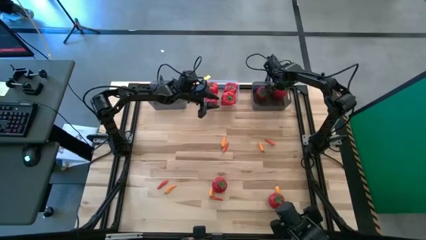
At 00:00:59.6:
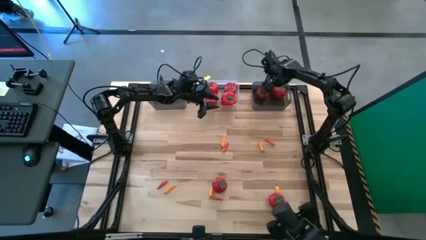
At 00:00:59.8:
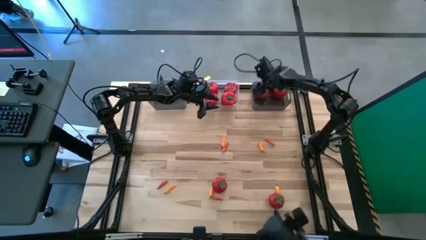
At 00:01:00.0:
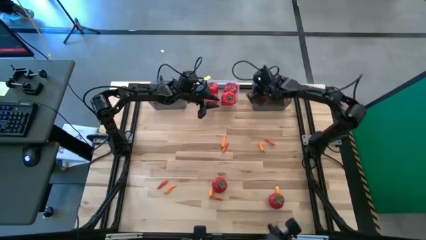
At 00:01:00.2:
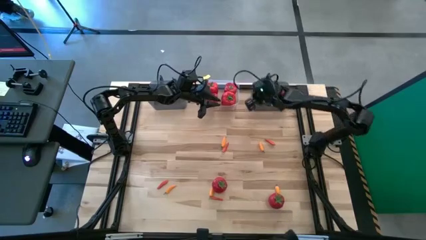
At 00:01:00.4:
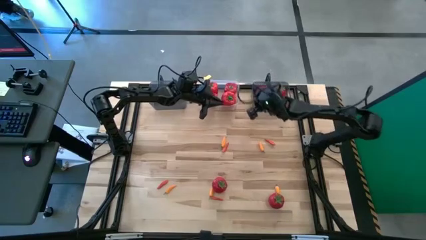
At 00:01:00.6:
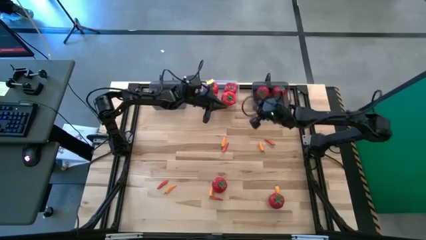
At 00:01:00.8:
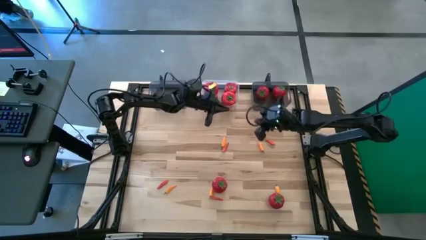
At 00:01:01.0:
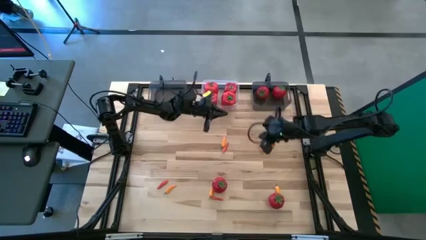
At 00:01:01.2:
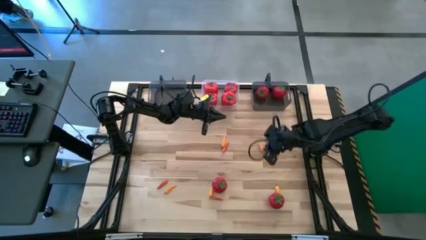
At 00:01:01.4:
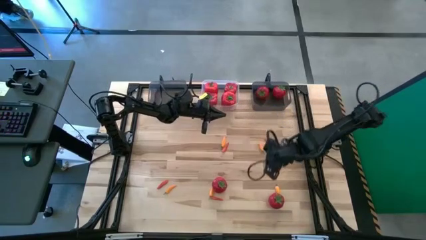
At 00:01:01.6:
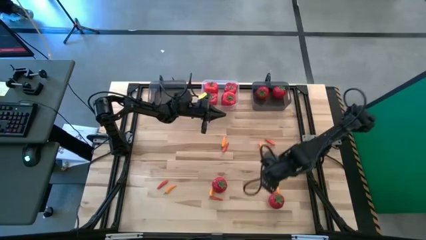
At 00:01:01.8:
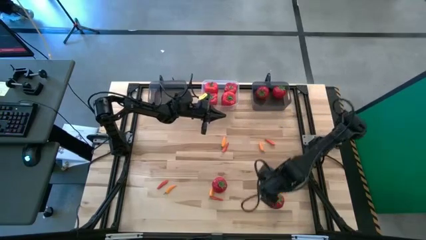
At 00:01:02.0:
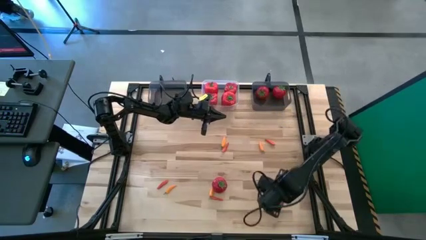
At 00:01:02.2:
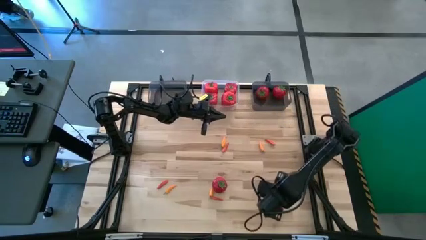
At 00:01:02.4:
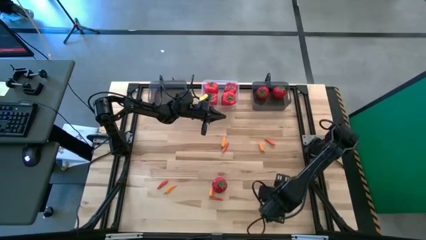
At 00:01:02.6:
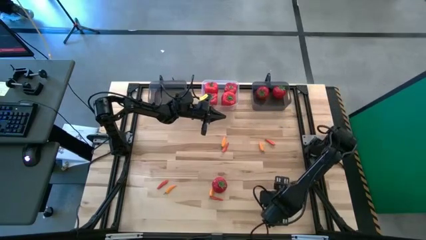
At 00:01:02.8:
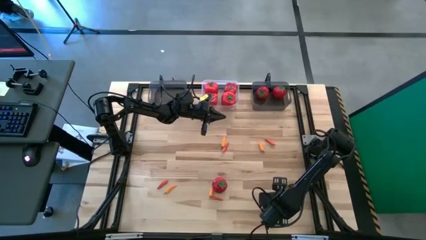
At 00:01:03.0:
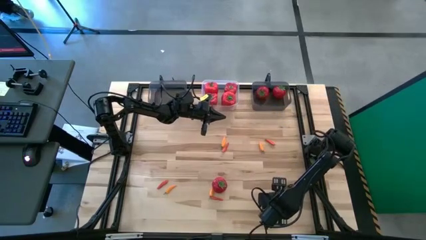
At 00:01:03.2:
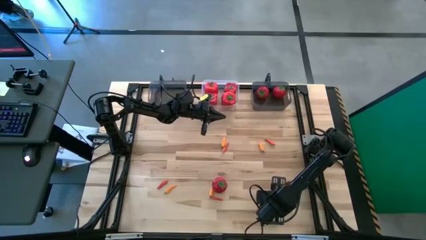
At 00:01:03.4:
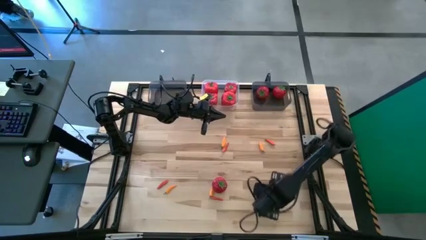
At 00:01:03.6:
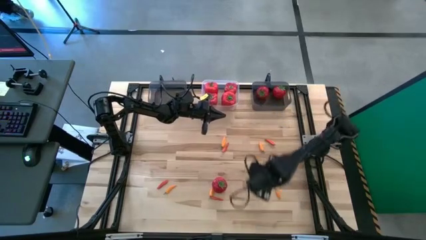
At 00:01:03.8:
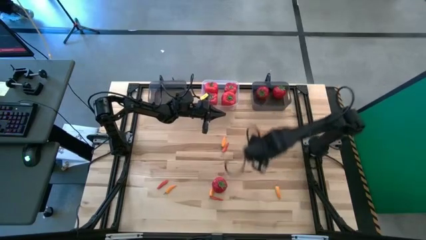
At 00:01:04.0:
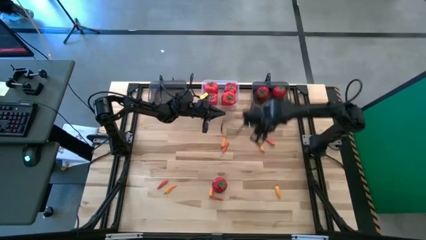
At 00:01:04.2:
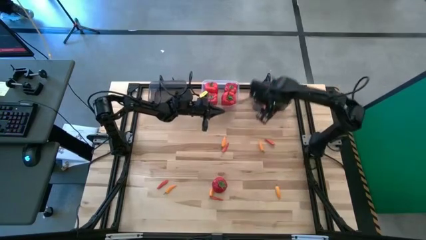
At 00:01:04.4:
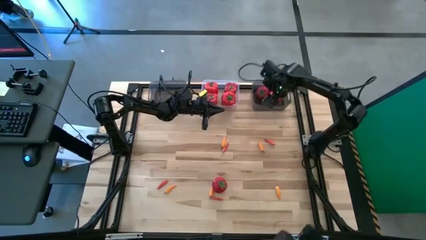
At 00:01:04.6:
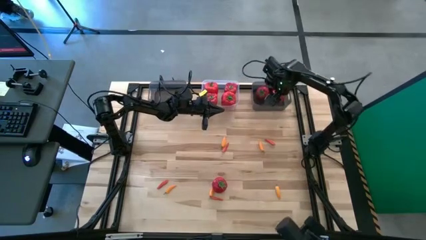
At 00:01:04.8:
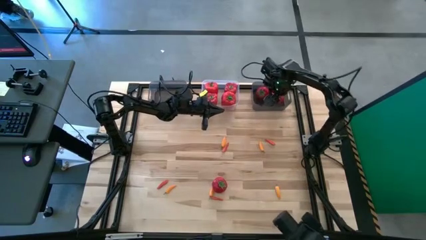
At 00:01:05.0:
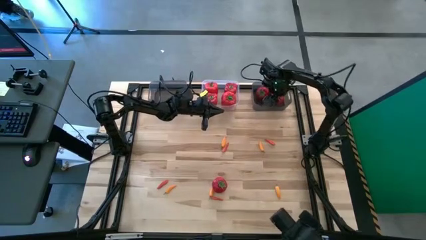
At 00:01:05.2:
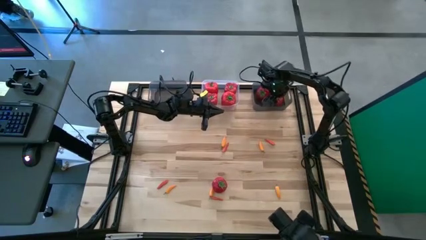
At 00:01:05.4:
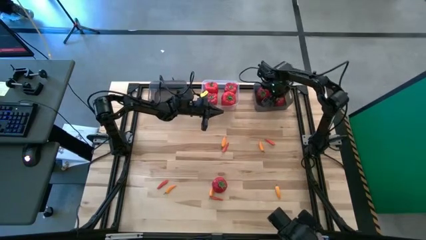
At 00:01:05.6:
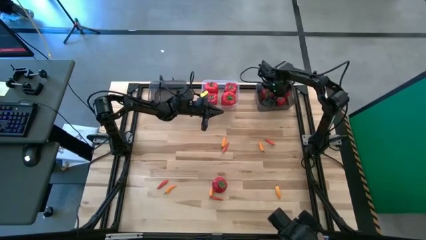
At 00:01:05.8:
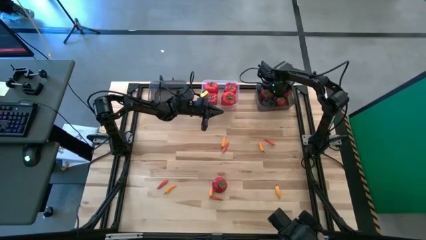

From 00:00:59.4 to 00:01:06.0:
Task: Sort produce into baskets
Put the red tomato into the right black bin

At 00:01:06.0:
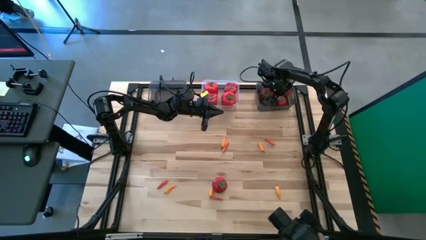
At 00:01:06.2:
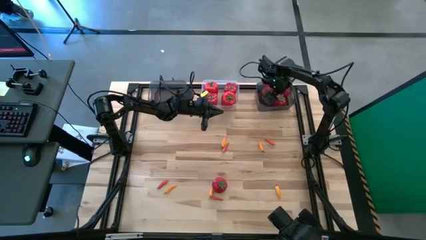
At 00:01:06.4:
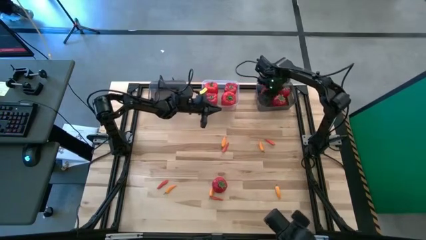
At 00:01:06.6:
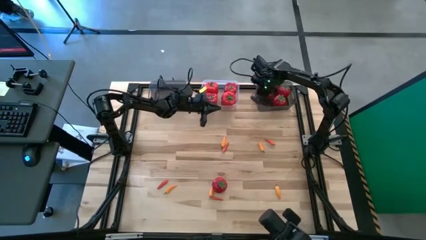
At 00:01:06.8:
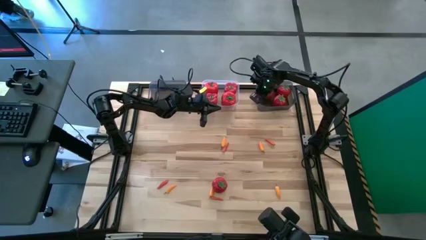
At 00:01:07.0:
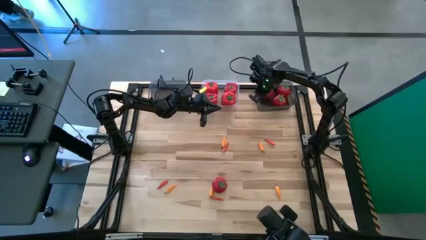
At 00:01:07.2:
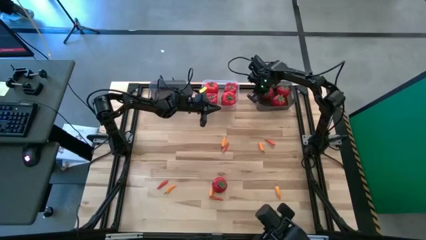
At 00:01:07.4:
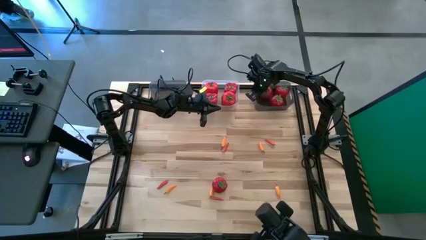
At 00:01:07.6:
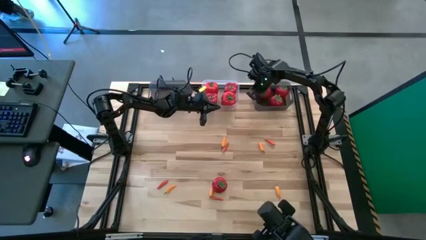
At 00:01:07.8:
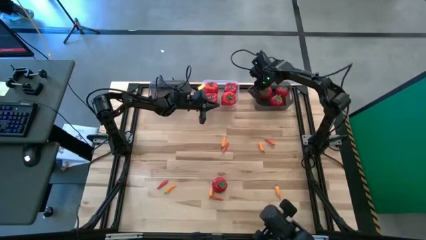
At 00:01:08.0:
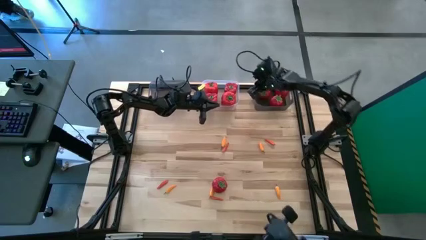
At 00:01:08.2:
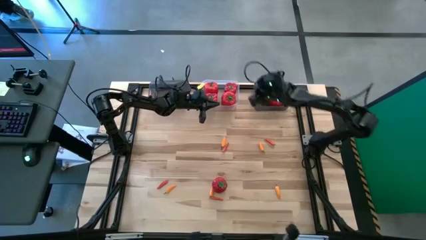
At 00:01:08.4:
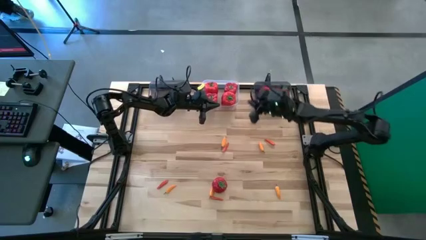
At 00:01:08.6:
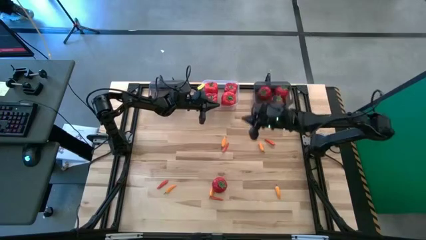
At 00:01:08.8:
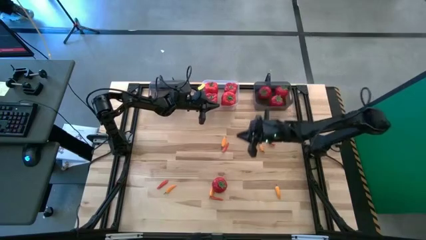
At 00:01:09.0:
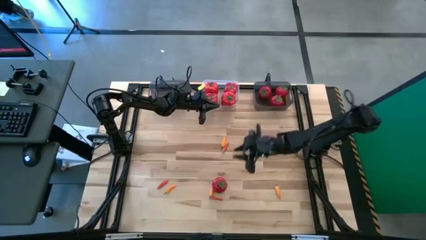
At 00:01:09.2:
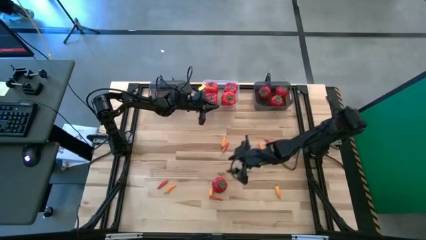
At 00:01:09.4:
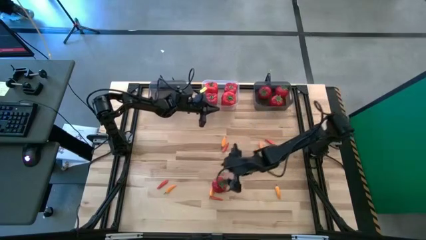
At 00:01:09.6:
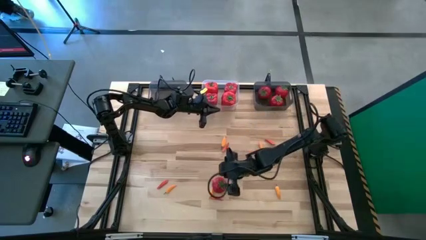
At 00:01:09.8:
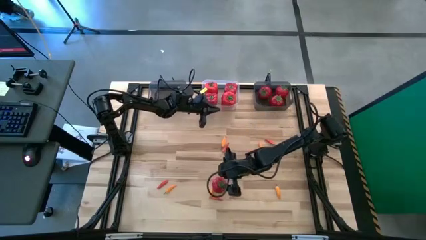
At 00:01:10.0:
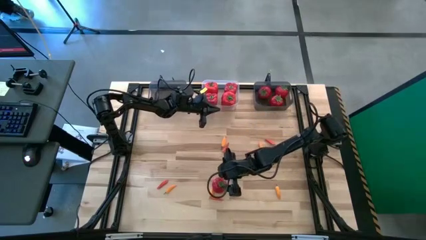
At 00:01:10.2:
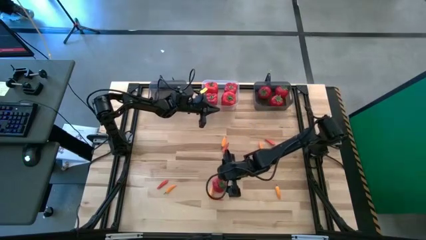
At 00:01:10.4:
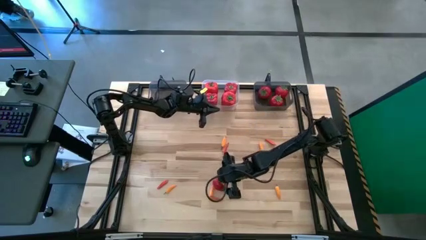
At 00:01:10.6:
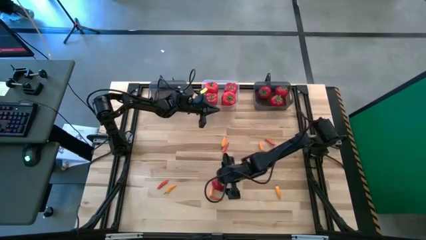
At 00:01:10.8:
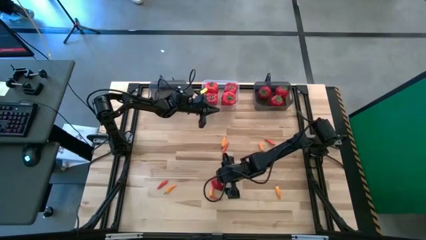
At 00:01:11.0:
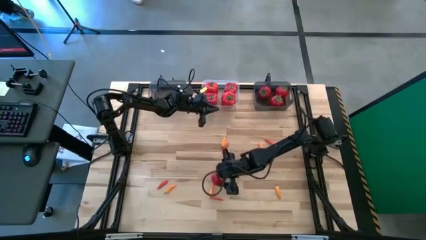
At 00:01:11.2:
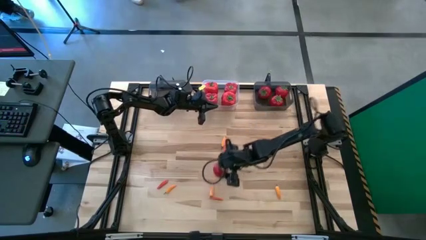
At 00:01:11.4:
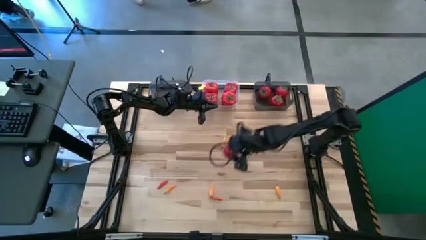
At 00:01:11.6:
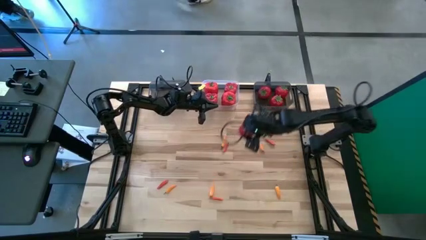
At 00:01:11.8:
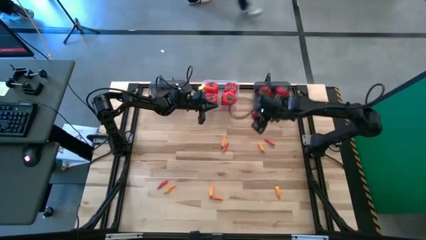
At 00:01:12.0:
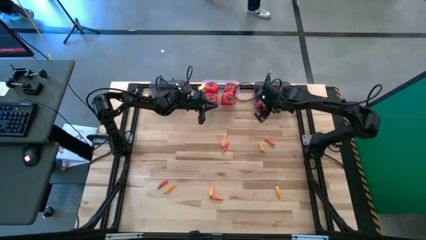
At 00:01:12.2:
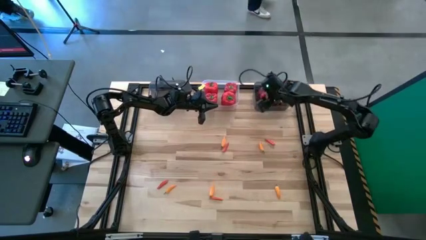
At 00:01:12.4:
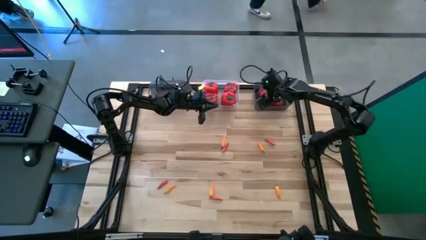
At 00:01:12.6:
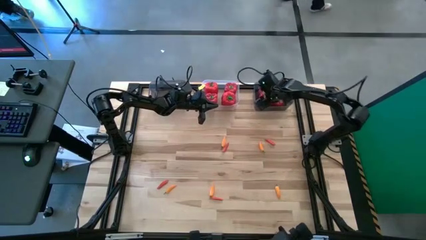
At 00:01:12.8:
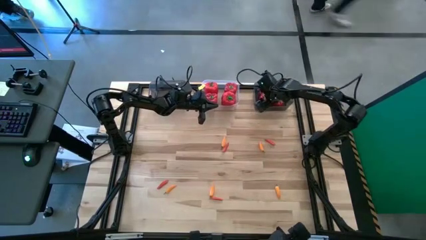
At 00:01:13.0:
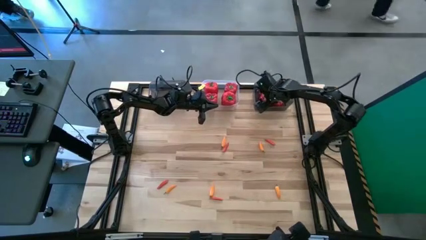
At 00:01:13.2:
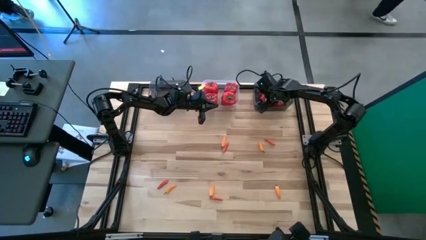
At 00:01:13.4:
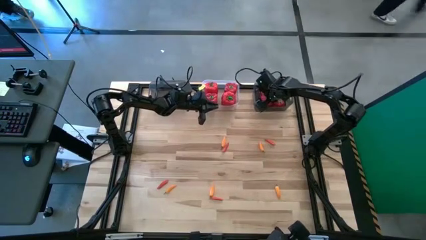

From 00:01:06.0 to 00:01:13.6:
Put the red tomato into the right black bin
